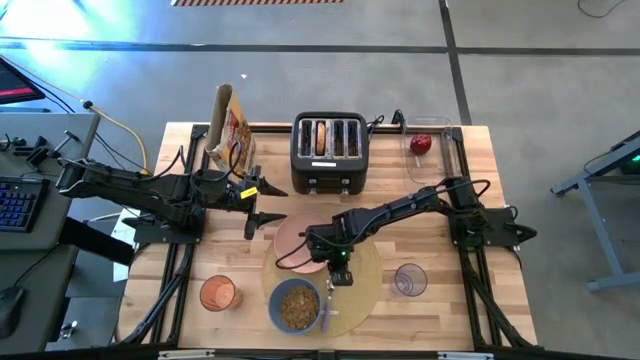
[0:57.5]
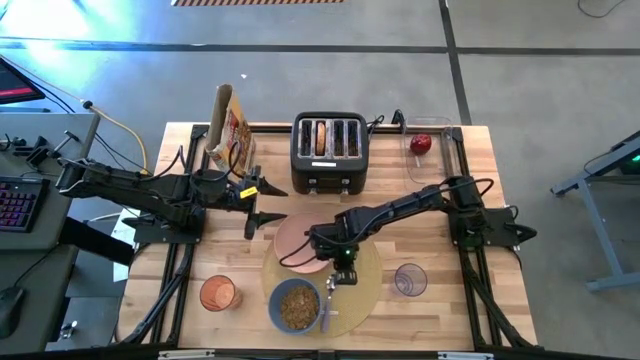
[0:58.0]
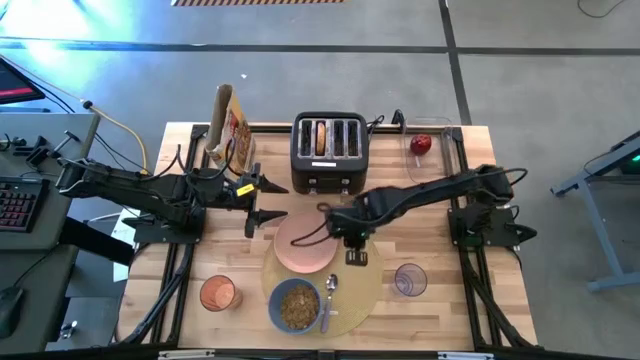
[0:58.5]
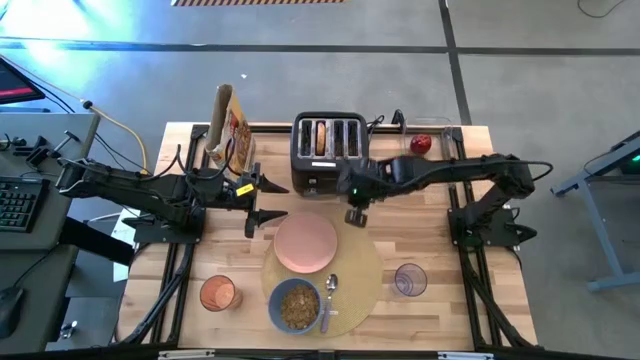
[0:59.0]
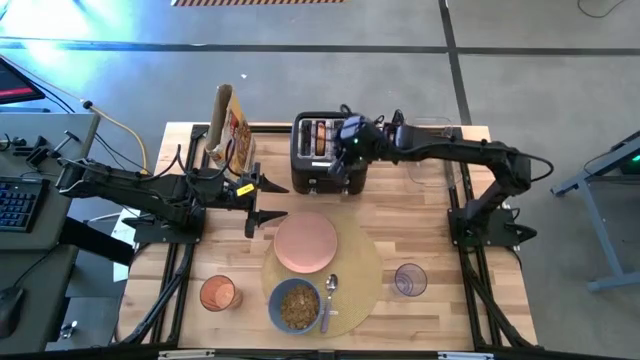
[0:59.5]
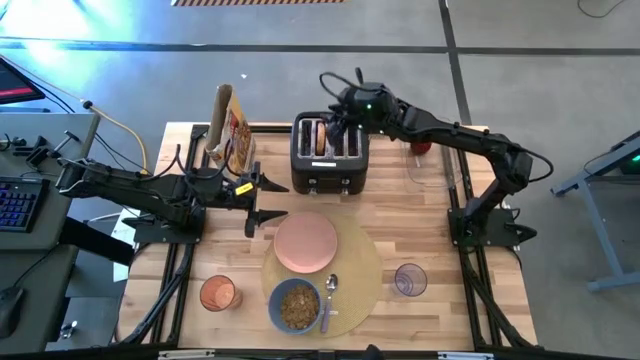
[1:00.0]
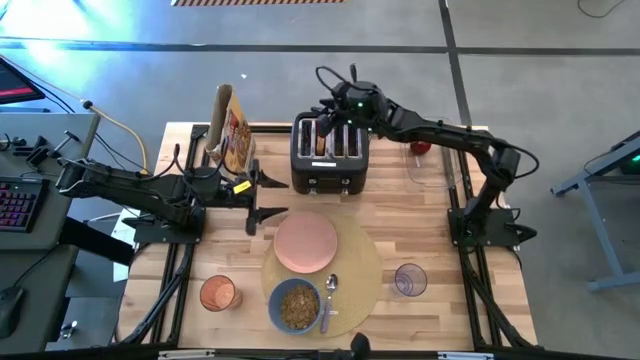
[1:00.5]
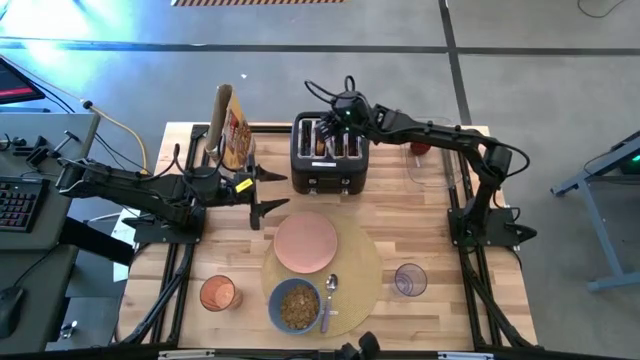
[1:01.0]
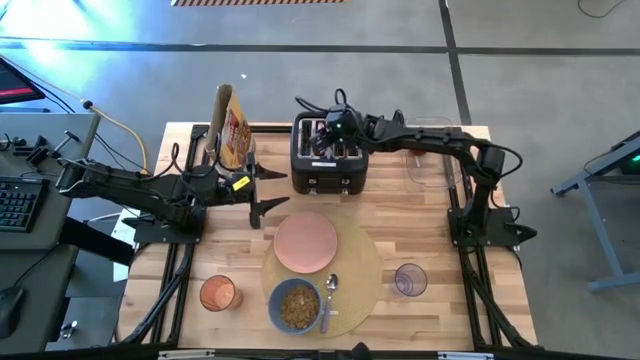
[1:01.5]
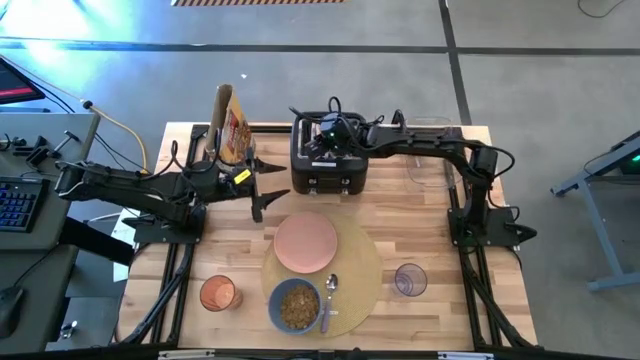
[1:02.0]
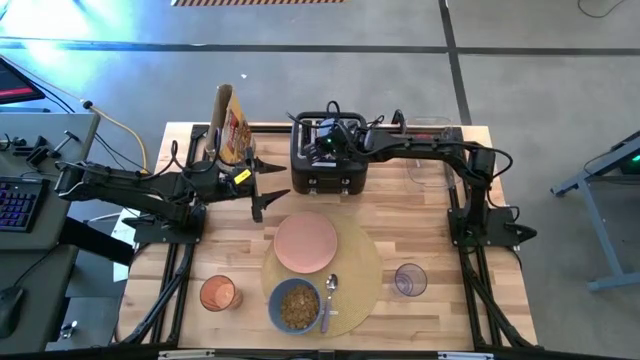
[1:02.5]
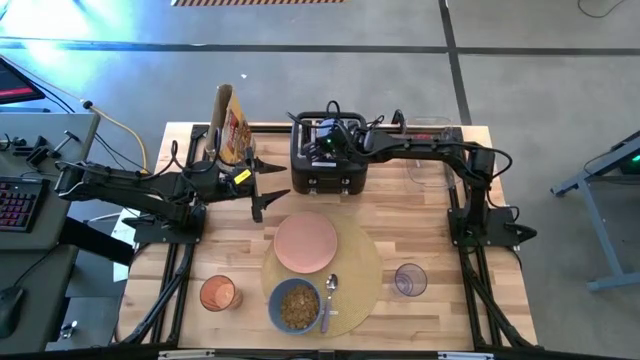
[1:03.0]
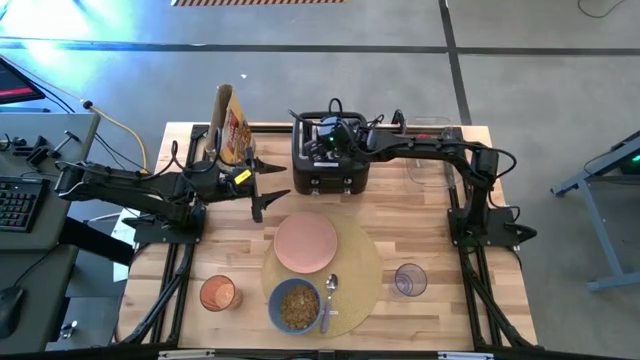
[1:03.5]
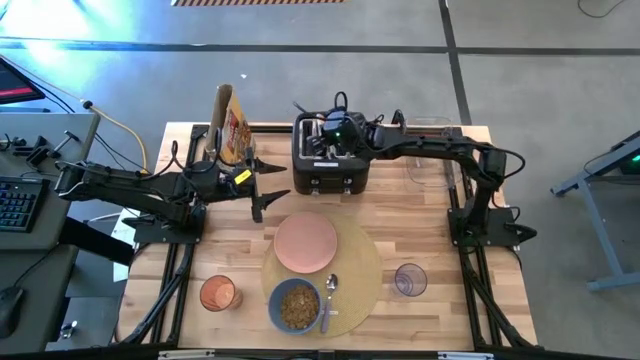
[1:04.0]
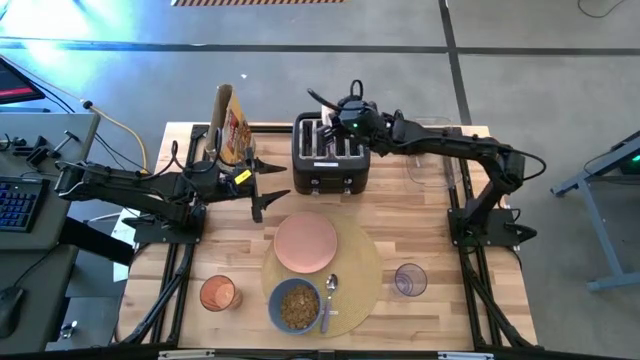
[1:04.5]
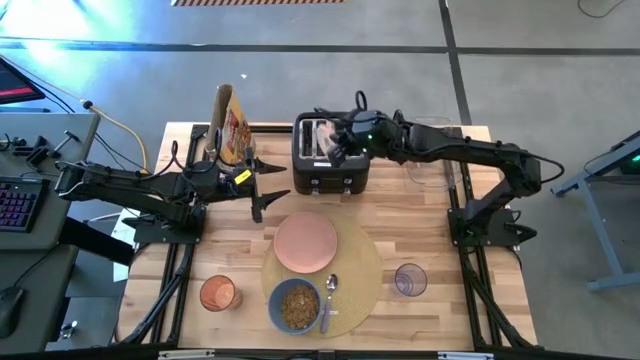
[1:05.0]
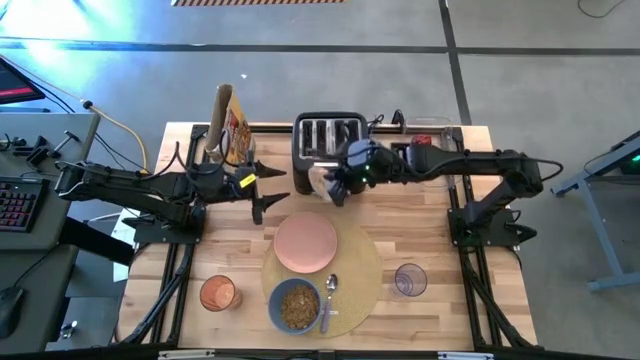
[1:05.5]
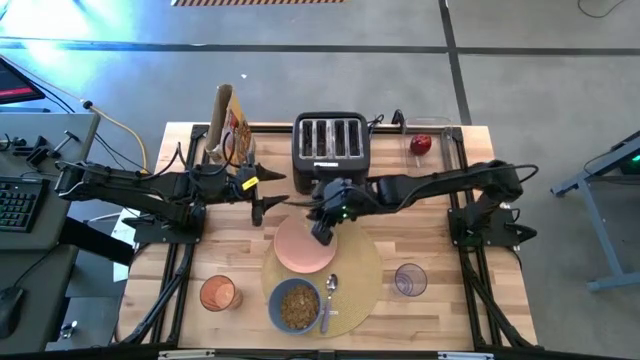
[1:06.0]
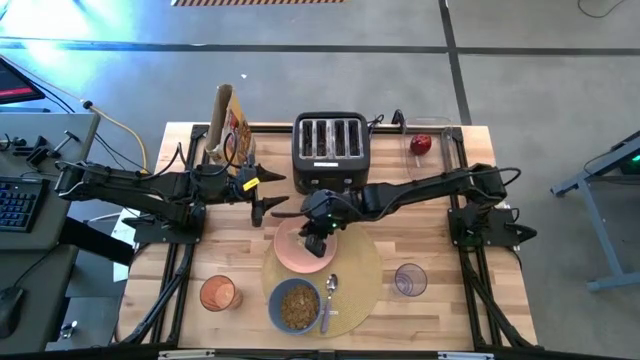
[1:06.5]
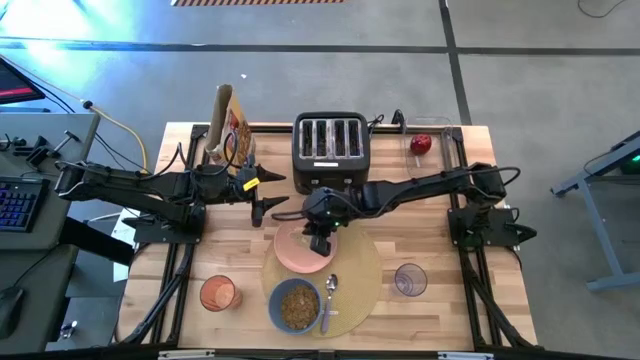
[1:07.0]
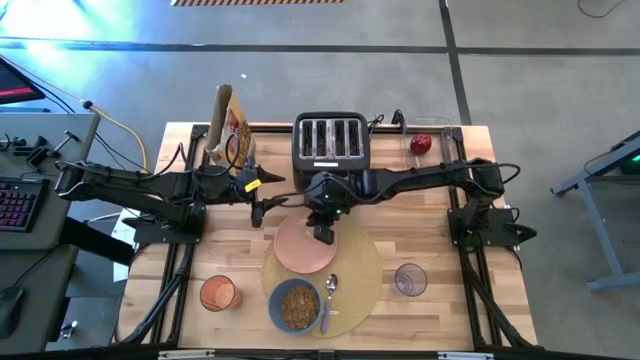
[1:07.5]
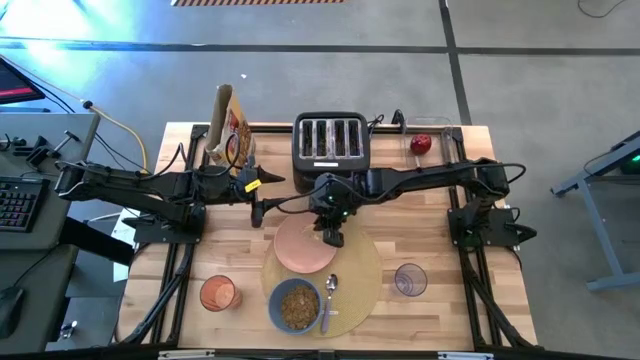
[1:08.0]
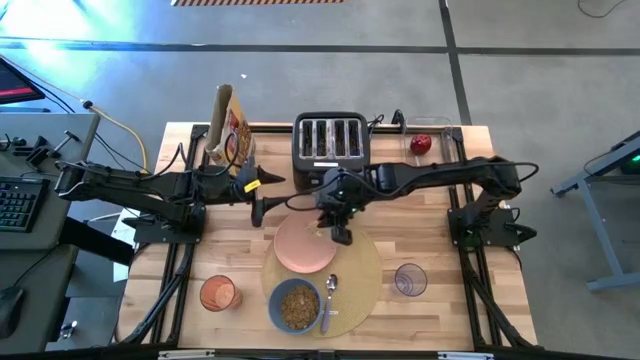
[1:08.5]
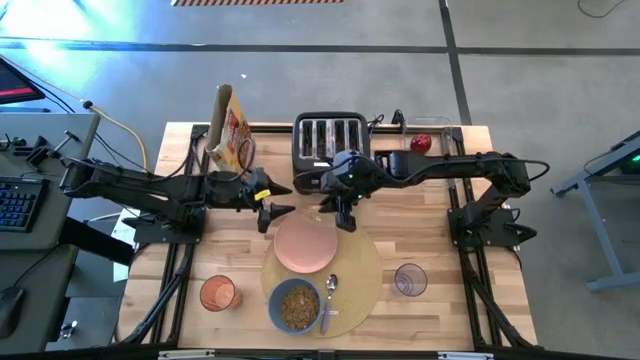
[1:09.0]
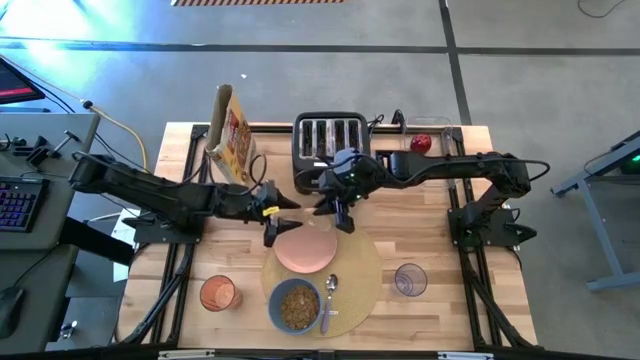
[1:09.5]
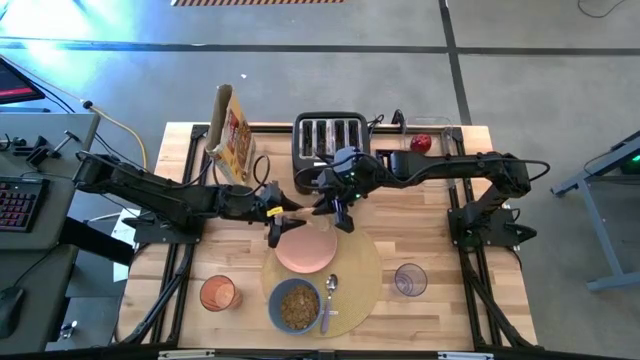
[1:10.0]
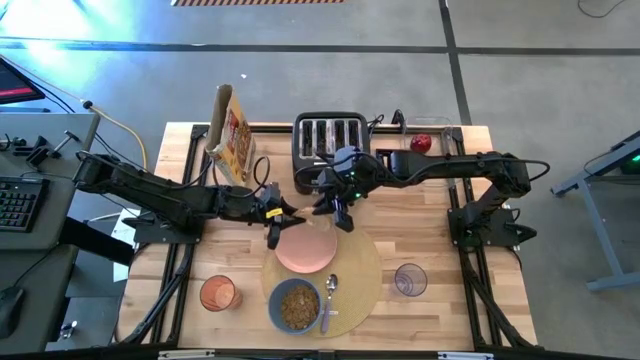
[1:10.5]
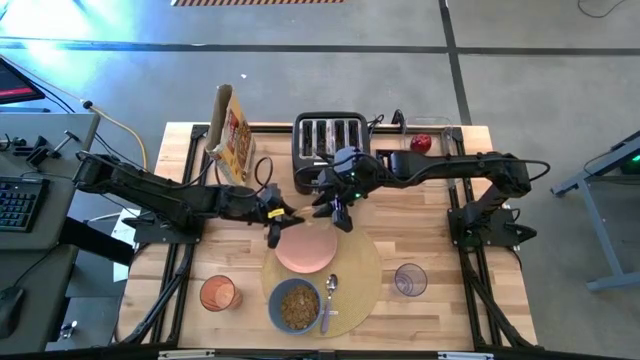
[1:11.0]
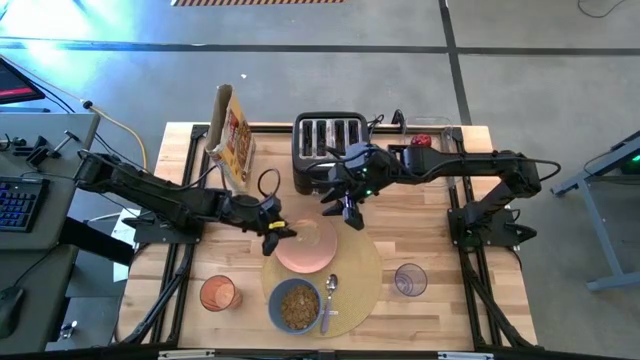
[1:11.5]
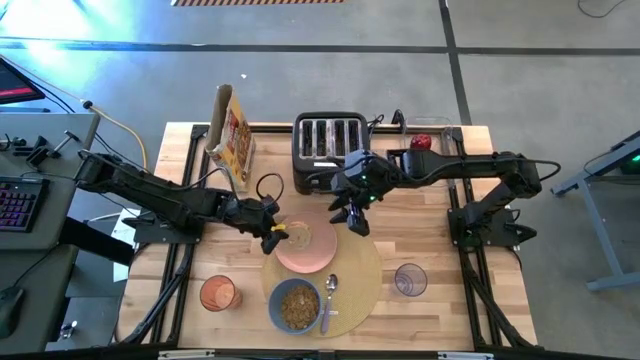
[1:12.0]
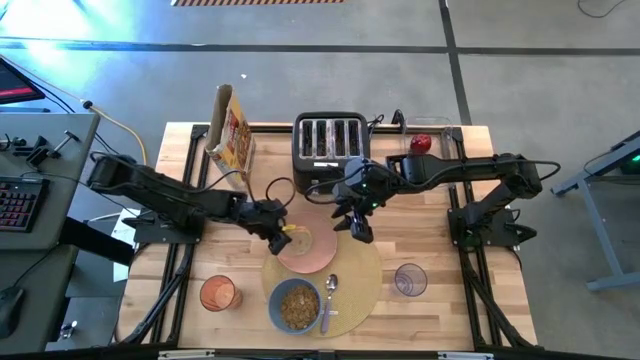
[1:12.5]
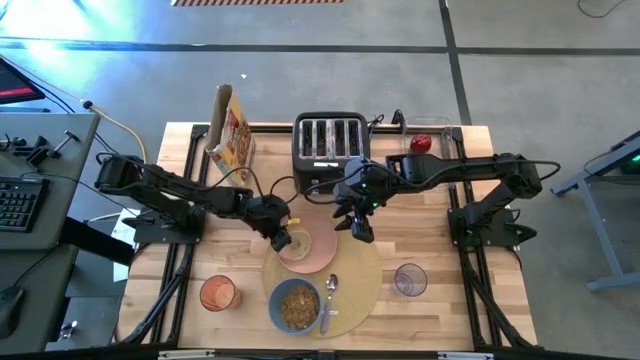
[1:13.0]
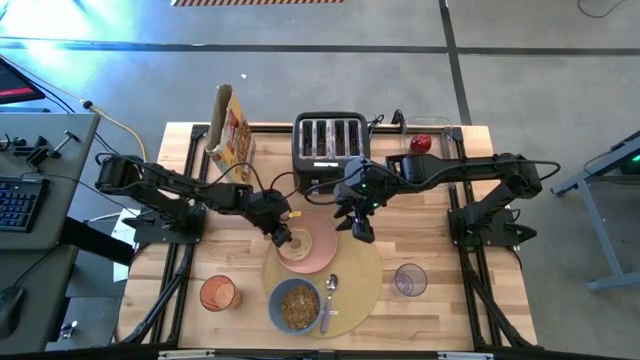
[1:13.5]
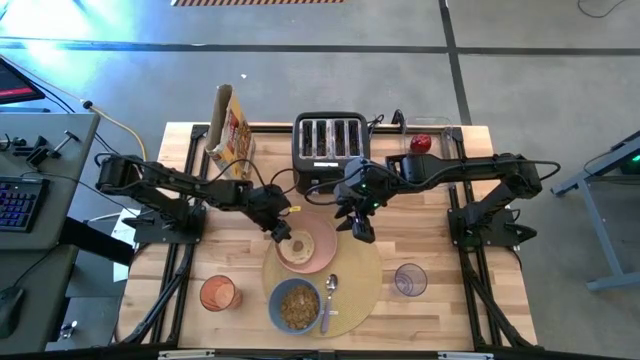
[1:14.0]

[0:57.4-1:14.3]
Task: Arrange a breakfast setting
Put the bagel on the plate

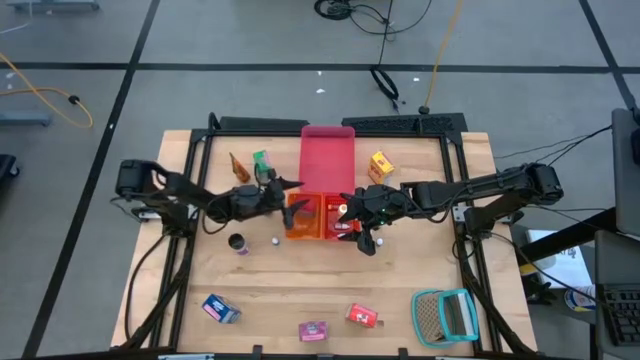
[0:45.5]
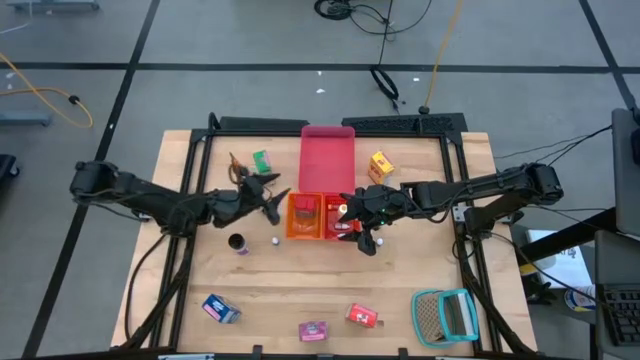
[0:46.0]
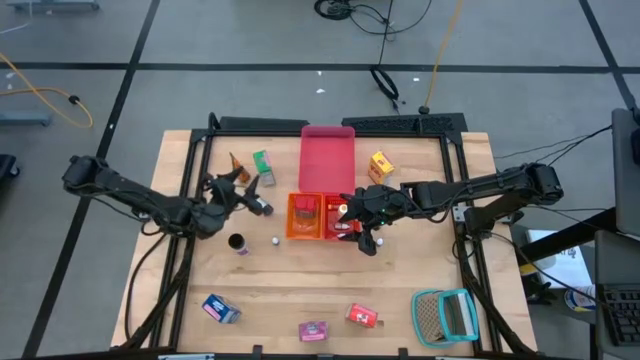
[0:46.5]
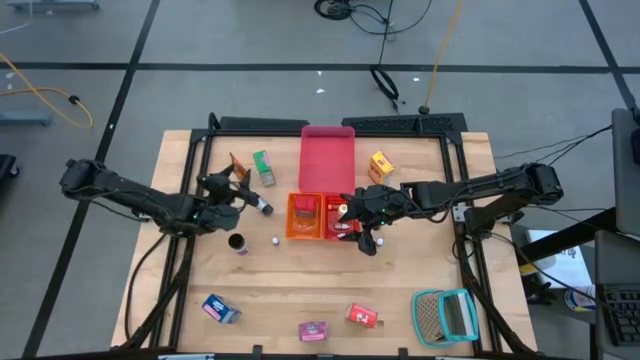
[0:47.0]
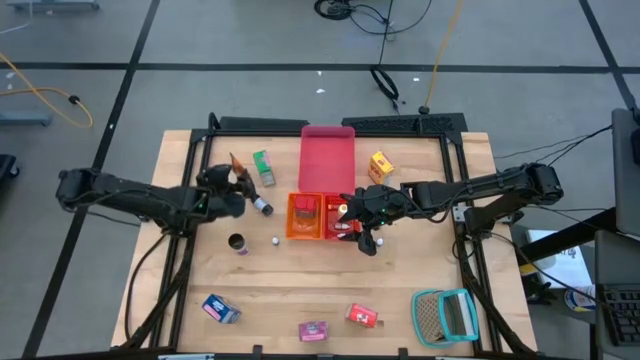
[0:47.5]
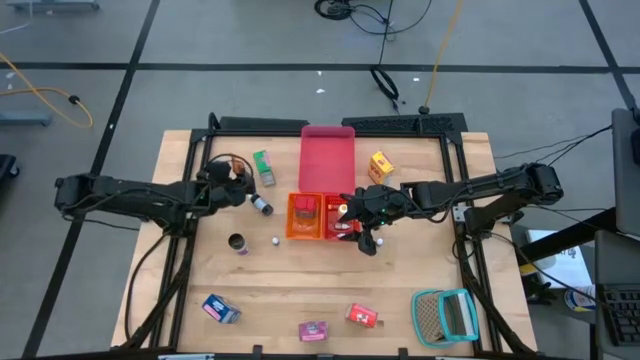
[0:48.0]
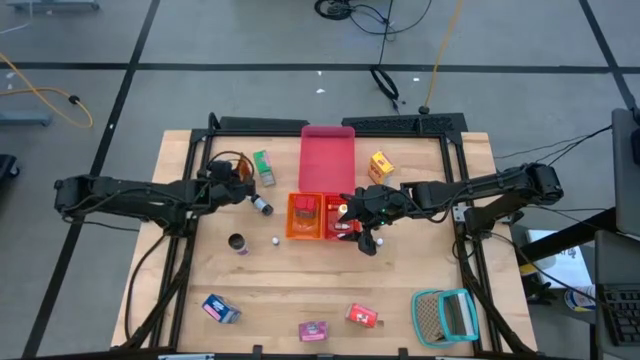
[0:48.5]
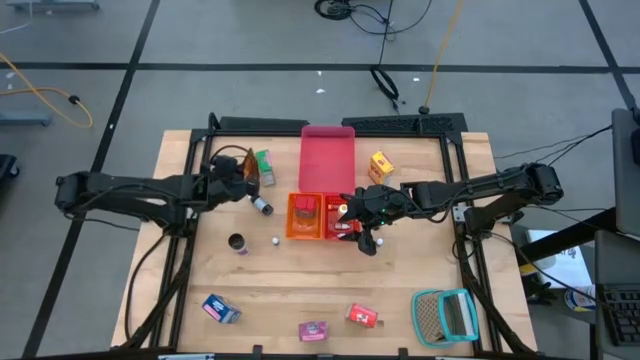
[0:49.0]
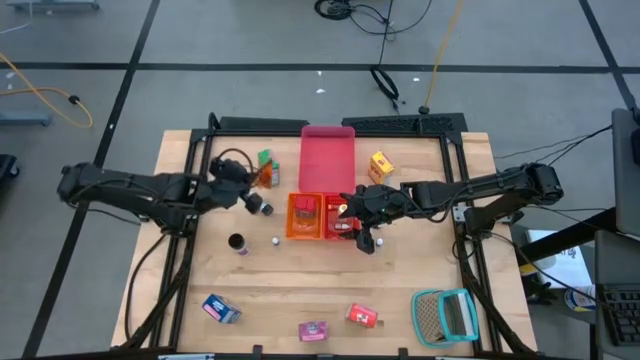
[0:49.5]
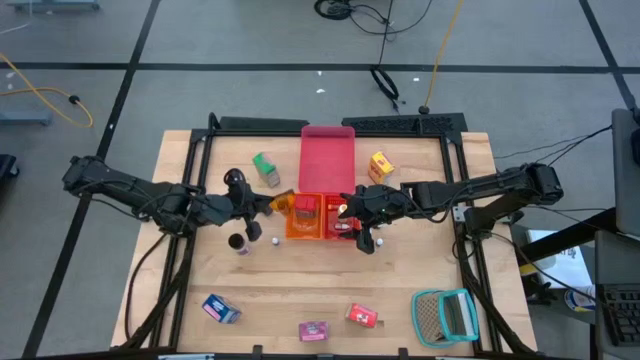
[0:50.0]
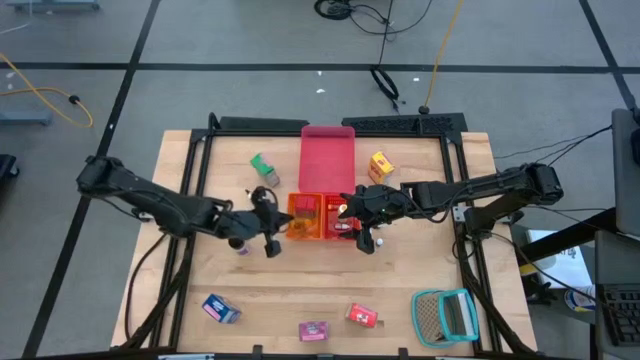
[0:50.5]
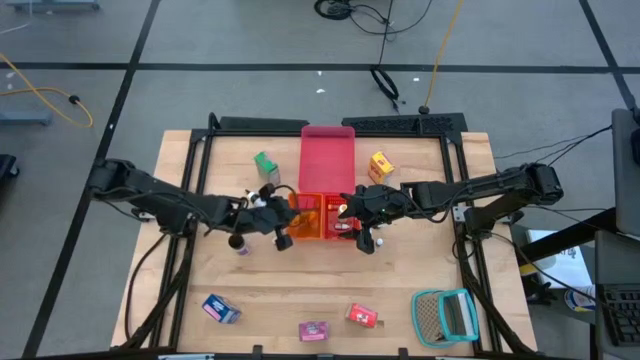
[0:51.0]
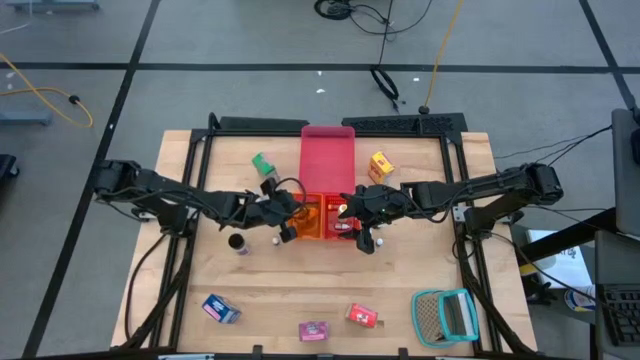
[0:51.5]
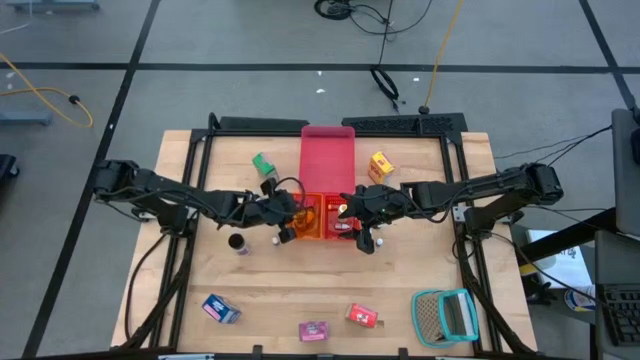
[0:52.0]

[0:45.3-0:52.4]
Task: Pick & Place Kitchen Items
Put the orange spice bag into the orange basket
